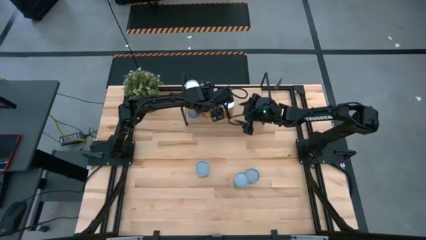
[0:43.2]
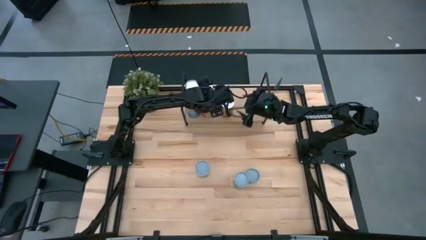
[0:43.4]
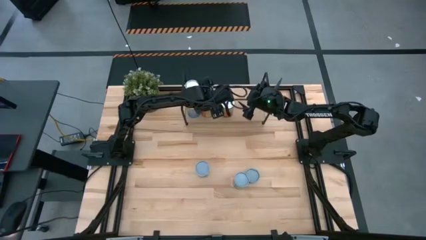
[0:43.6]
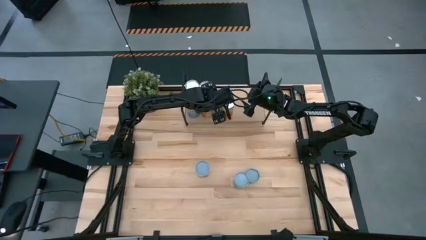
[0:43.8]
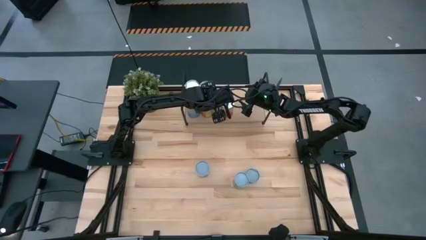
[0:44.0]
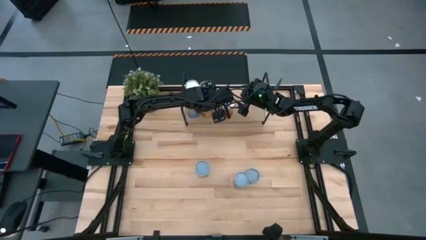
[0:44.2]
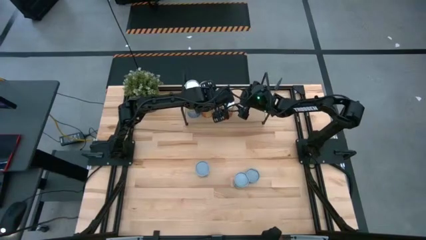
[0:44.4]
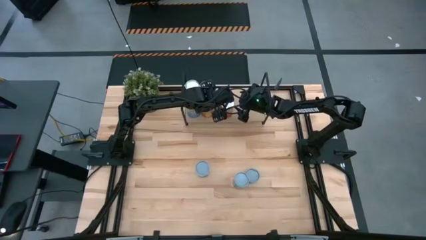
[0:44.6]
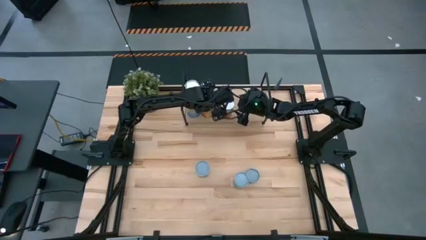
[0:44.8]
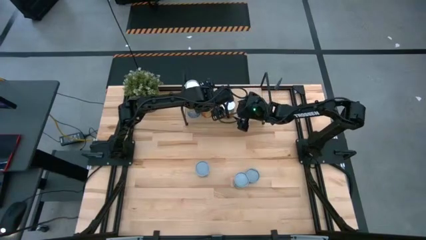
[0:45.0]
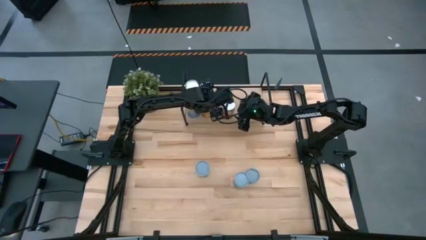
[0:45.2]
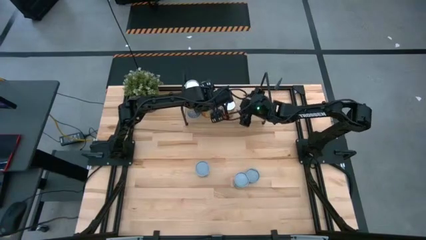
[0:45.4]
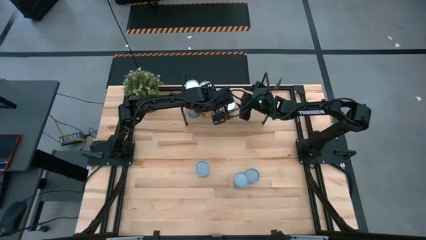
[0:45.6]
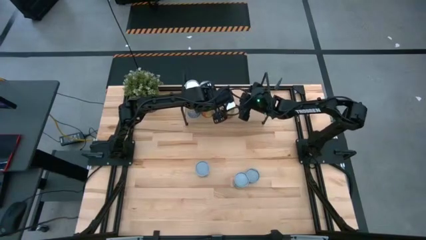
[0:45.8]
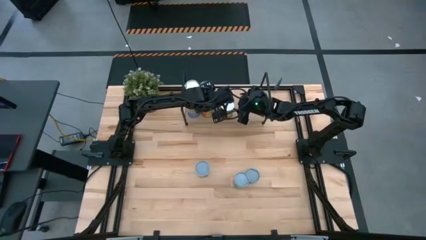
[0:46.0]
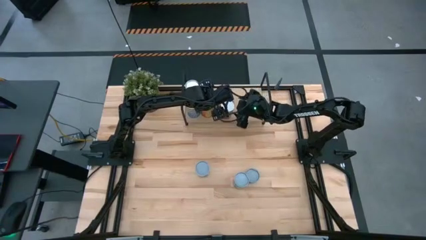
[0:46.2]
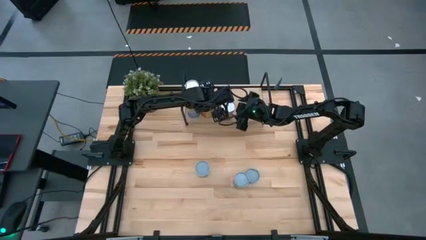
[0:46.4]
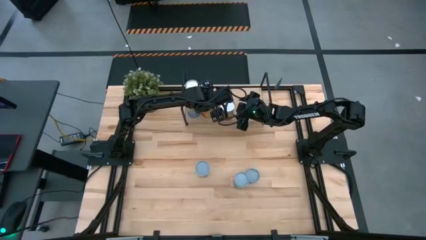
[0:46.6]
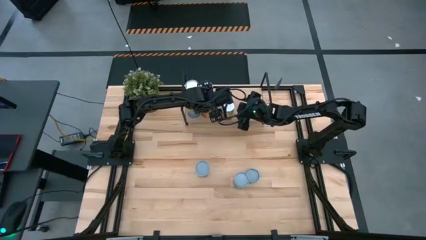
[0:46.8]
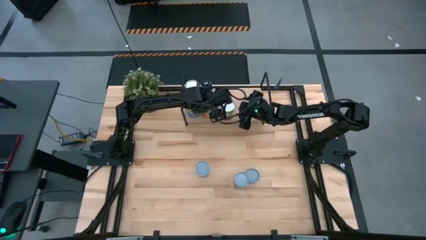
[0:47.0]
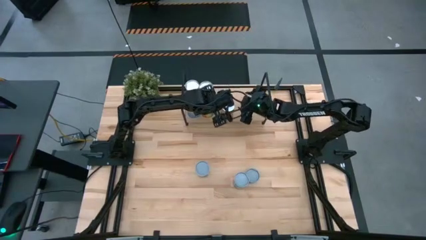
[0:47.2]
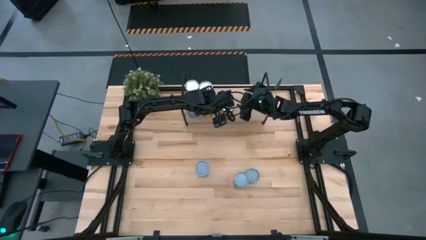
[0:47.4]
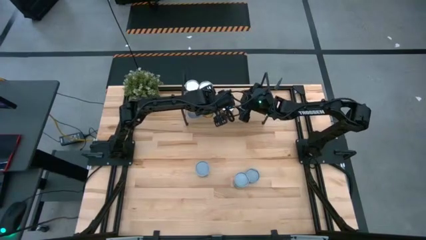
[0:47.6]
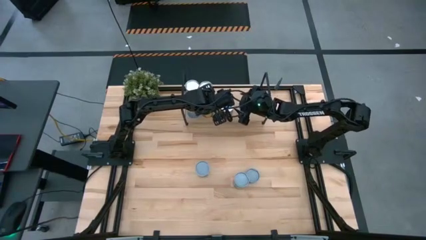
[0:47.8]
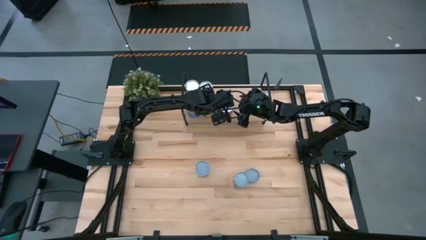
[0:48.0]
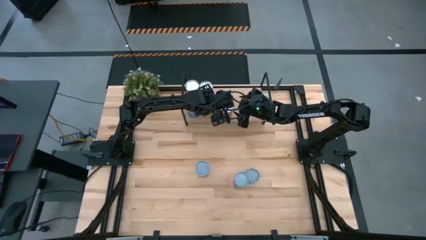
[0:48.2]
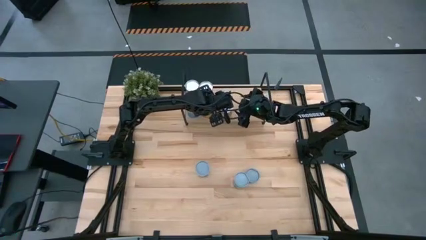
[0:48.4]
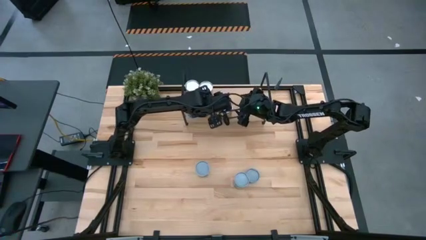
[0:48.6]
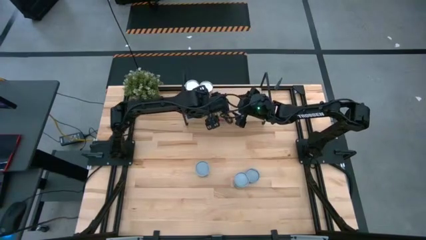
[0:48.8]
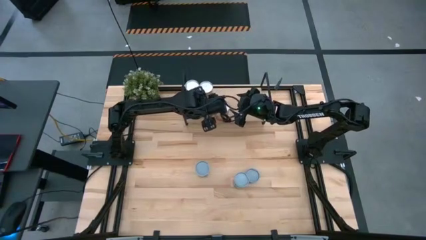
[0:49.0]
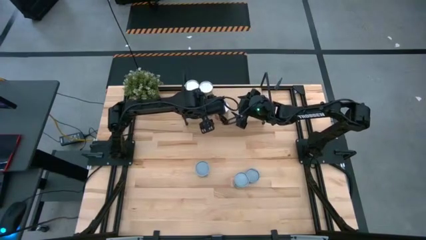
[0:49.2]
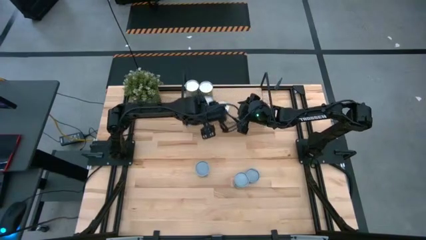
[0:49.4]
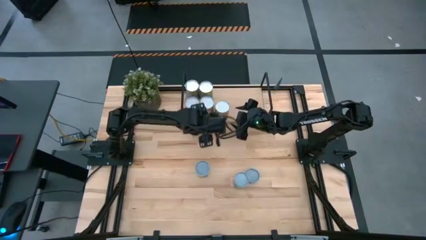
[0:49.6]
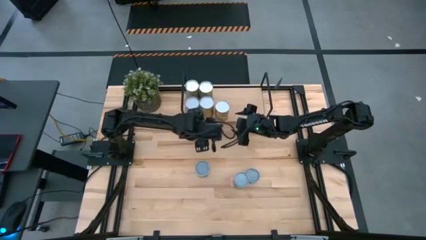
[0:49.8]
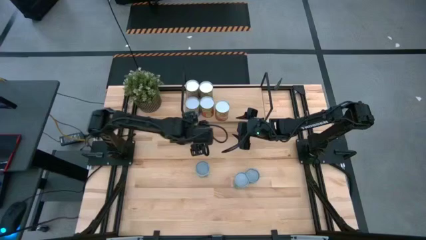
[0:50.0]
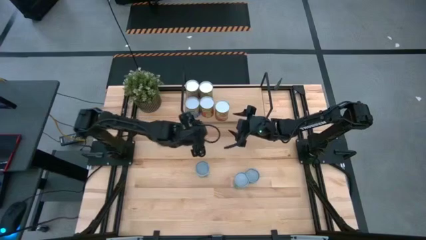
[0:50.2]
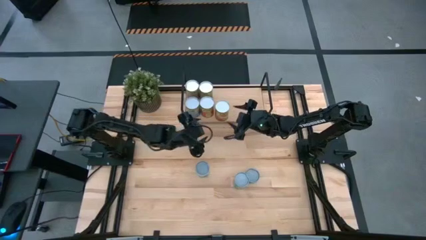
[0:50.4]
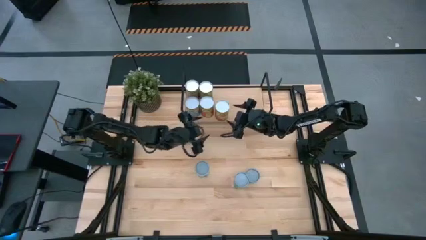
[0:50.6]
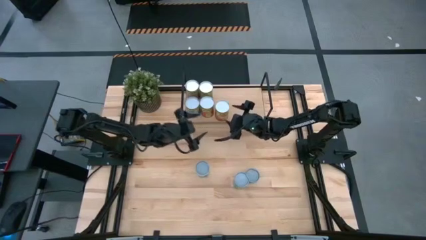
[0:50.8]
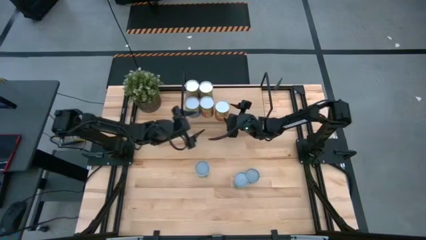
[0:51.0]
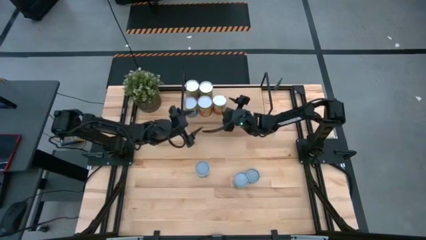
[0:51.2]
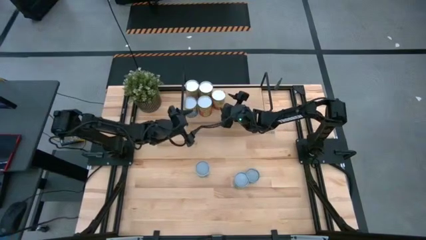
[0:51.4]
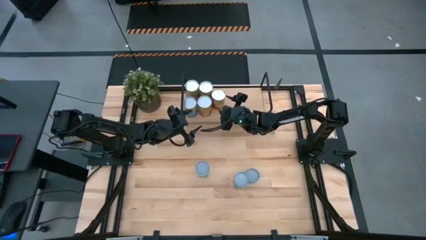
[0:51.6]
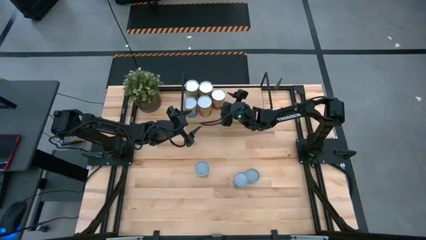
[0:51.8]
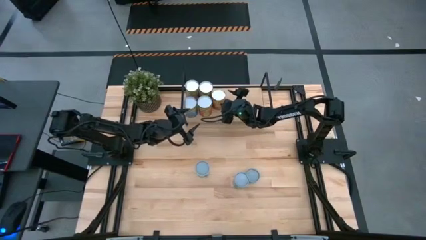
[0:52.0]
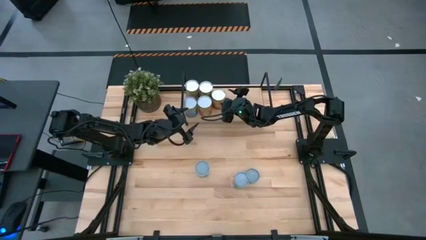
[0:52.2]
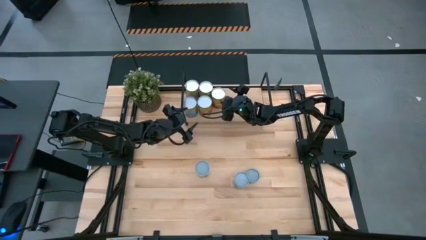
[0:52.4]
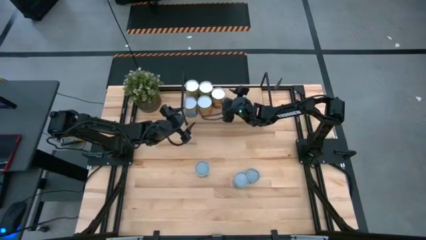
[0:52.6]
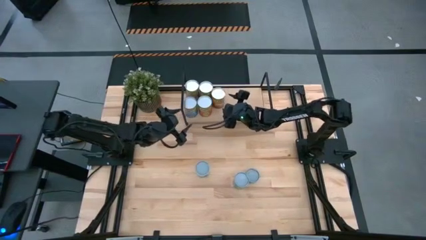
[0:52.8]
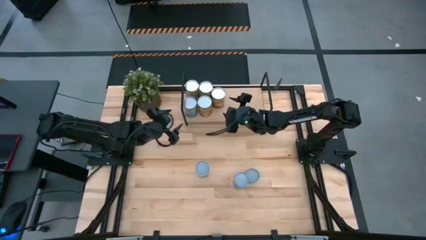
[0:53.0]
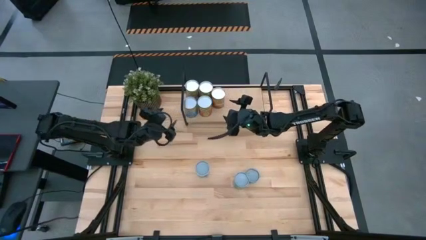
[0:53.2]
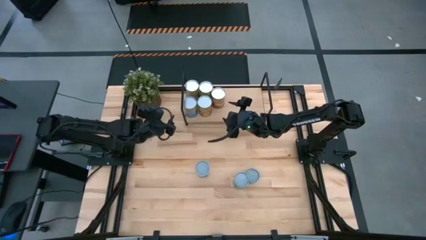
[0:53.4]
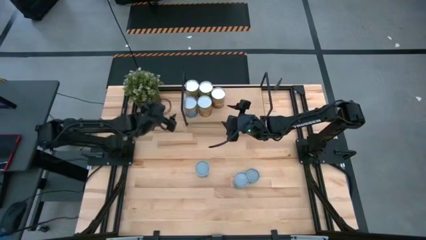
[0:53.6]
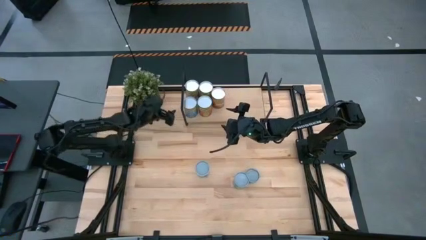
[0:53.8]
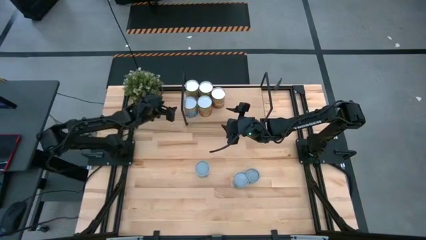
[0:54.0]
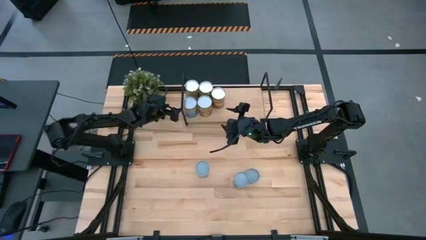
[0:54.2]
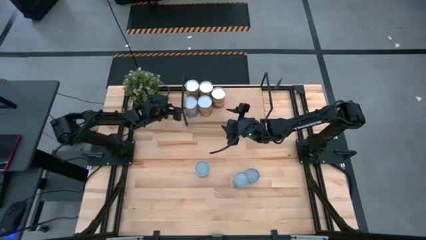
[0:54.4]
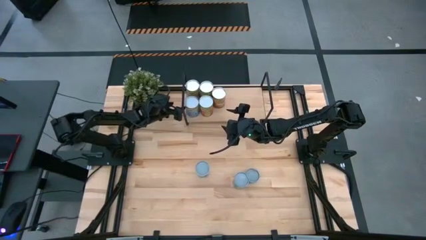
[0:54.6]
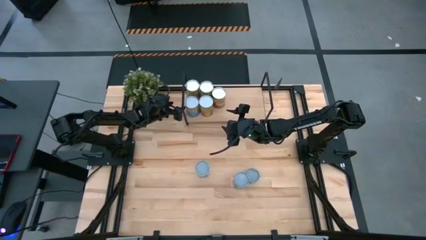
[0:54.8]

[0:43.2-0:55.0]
Task: Pick and place cans onto a shelf
Put the middle orange can on the shelf

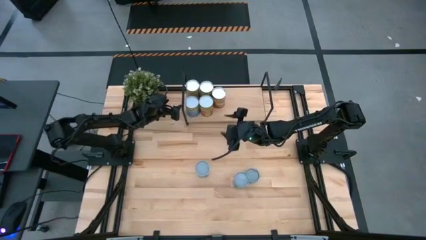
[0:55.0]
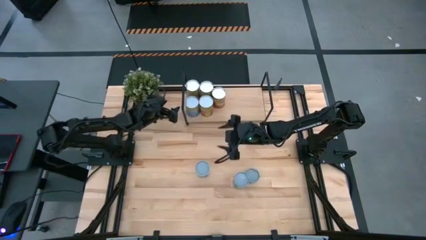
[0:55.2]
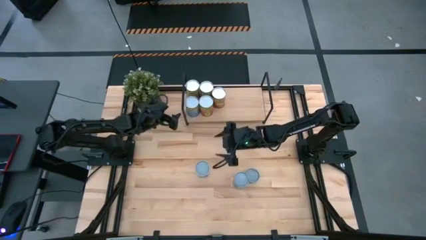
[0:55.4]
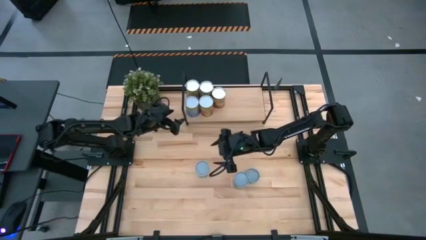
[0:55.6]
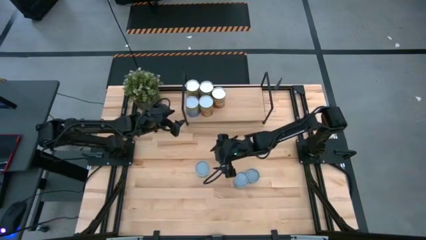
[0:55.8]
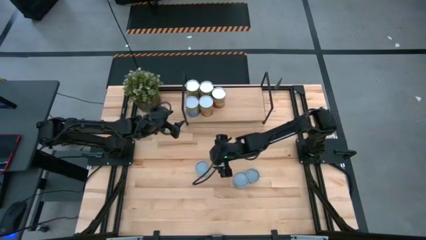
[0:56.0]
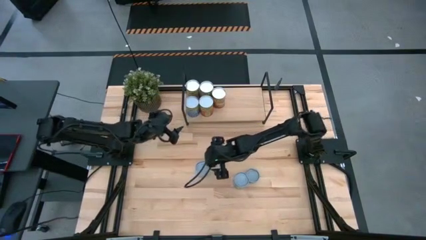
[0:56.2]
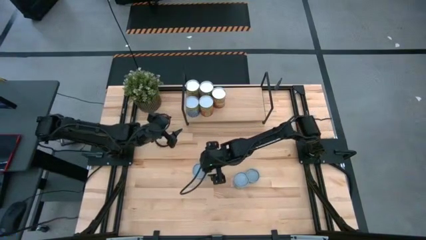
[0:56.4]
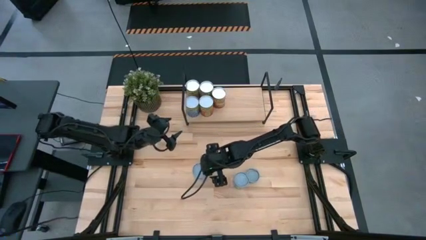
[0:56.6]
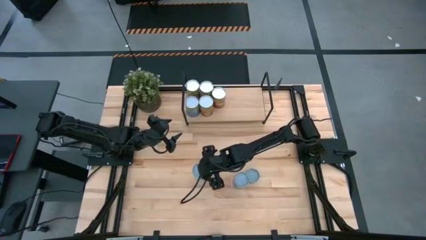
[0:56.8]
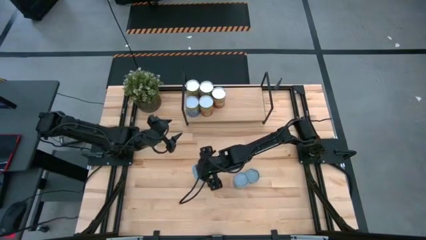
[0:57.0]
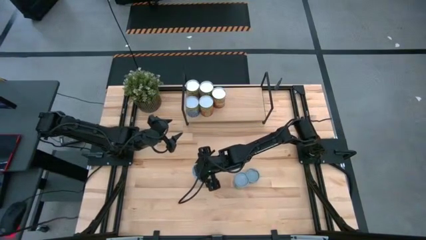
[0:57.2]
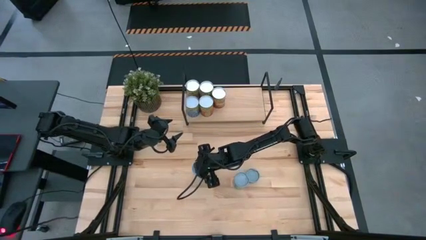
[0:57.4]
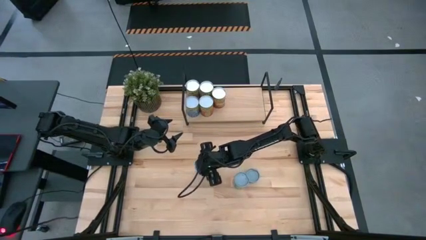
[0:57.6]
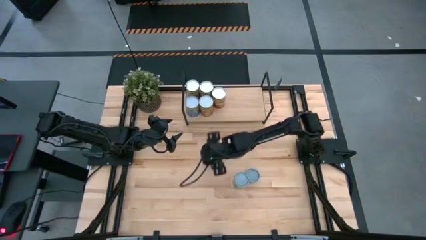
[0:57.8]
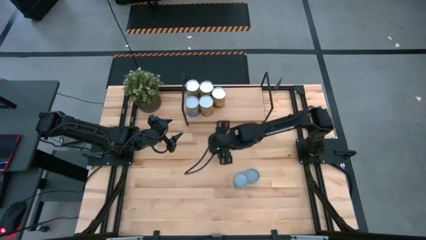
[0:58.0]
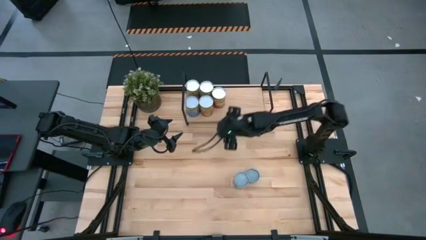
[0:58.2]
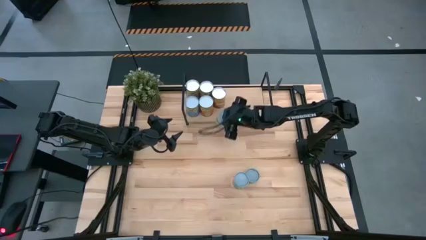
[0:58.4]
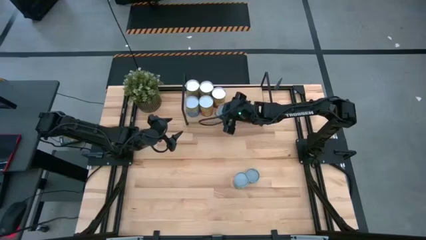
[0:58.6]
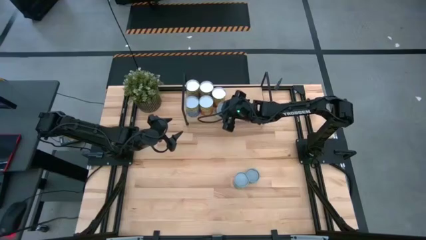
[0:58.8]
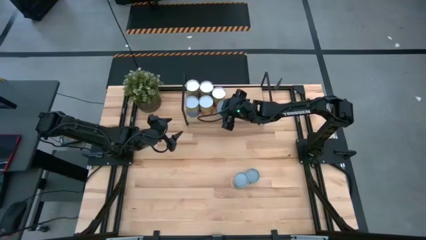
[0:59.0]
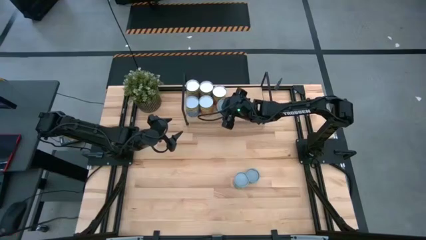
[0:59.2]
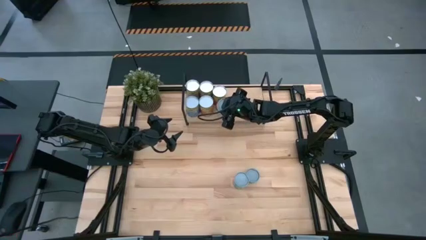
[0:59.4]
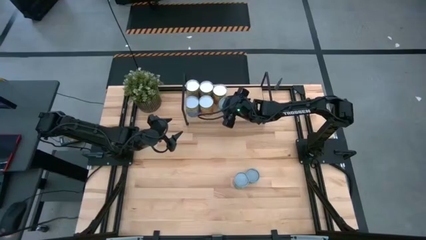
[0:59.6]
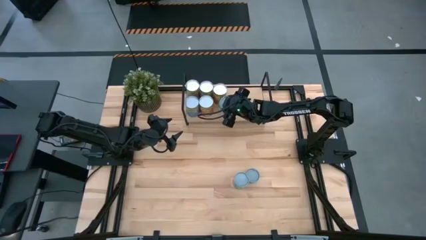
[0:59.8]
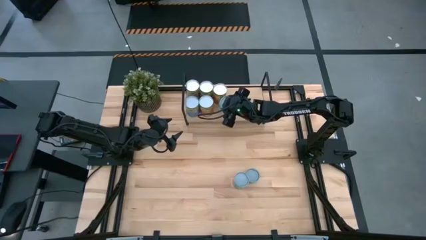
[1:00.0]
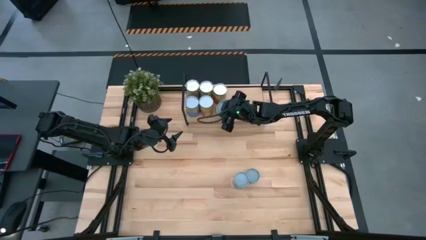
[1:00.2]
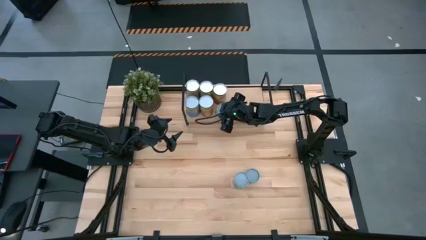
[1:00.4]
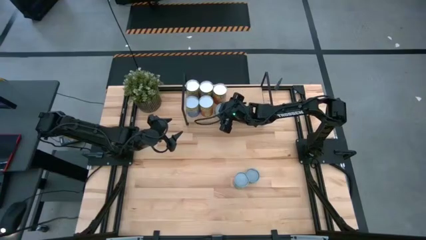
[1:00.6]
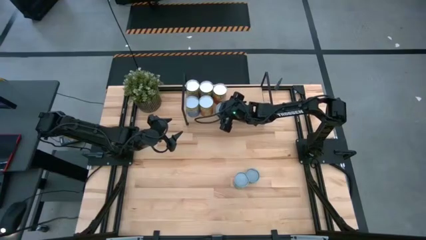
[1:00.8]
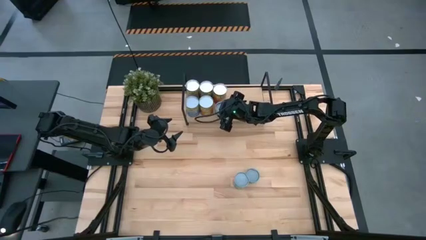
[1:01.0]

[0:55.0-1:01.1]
Put the white can on the shelf
